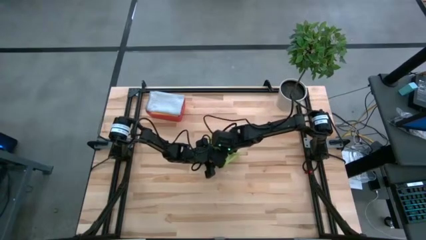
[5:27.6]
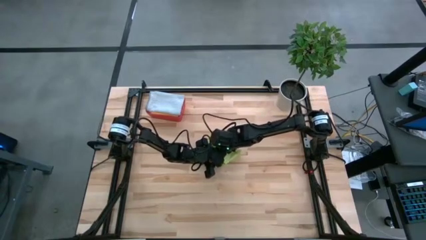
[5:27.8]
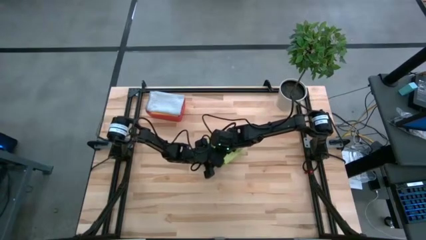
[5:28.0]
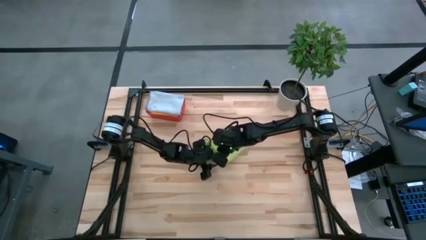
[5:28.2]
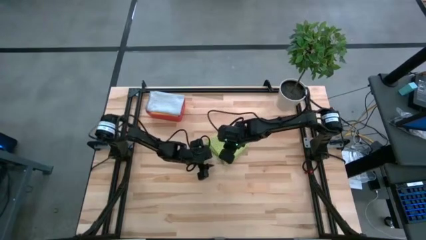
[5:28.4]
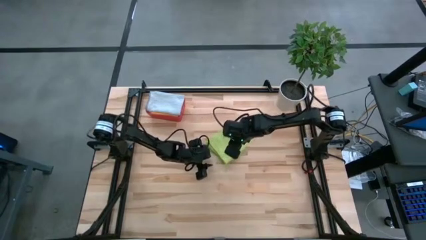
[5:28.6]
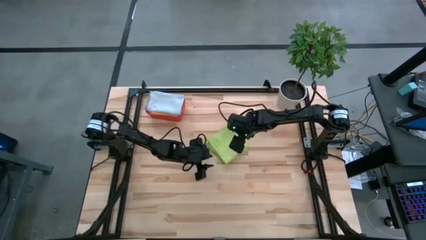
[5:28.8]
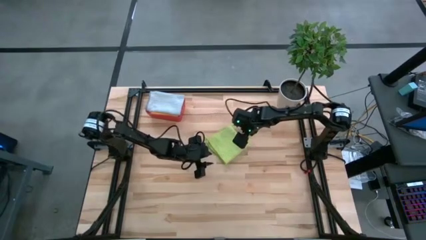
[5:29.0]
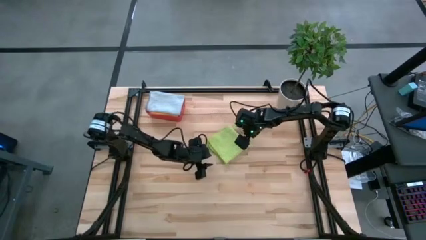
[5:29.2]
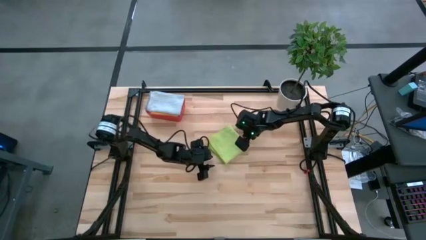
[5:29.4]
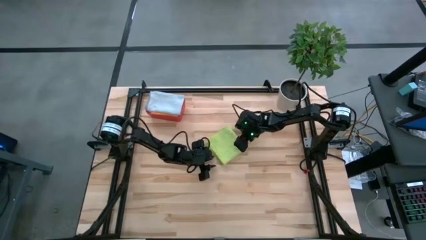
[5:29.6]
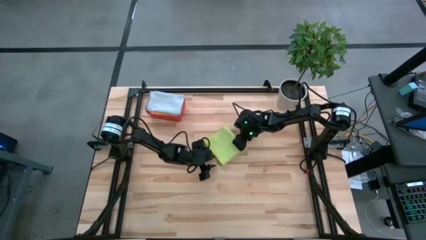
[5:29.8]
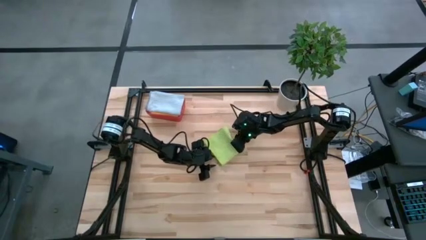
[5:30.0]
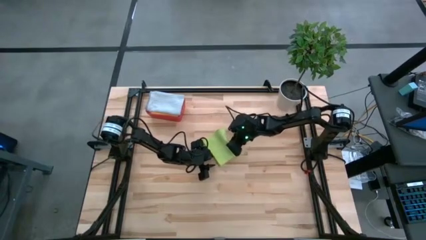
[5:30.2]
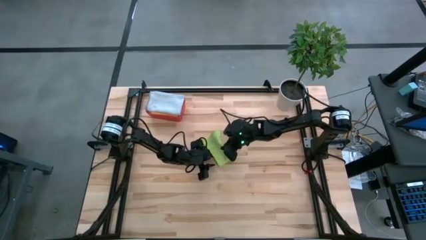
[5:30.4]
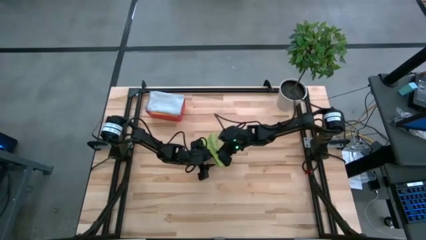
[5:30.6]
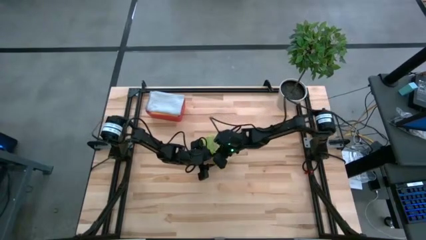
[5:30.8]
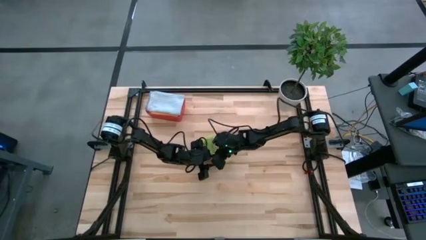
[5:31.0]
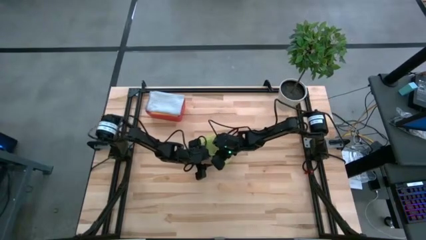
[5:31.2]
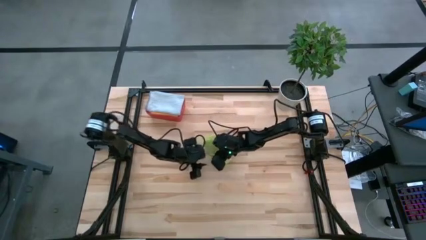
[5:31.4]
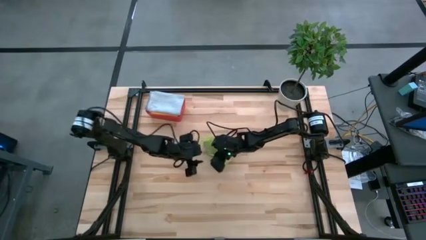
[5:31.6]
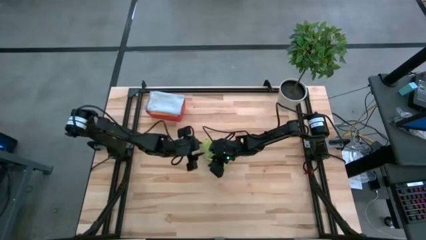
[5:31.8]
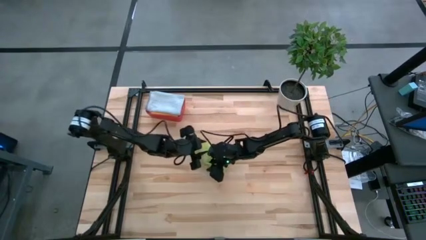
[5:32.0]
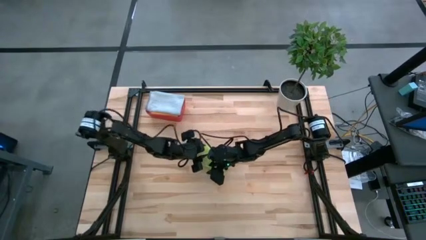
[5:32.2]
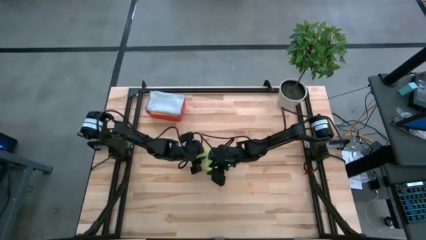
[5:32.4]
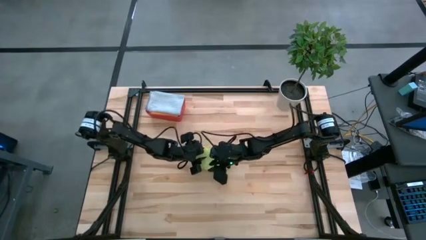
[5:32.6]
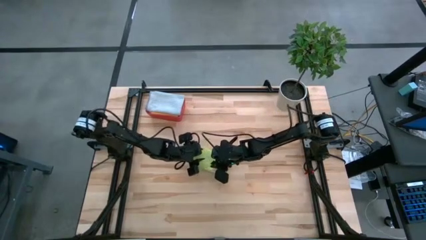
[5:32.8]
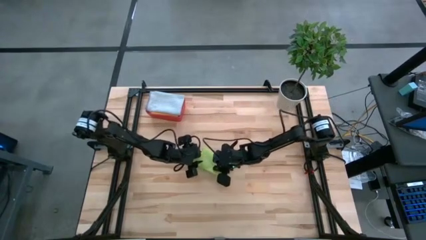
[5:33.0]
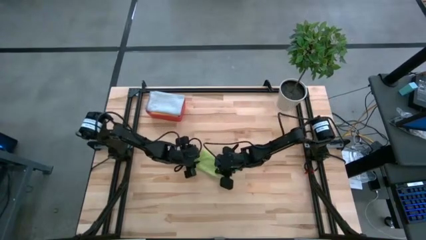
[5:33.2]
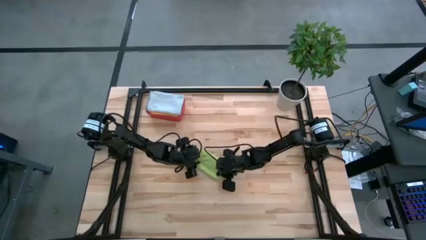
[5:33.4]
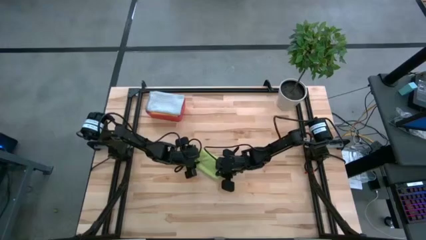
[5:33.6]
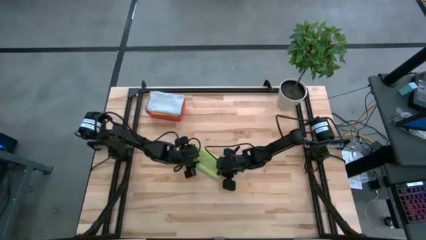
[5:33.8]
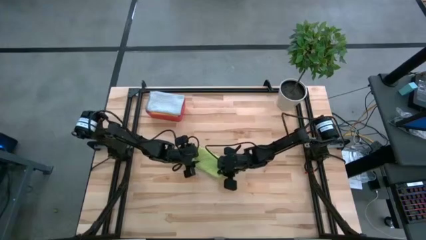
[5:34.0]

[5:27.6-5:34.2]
Task: Fold microfiber towels
Fold the light green microfiber cloth

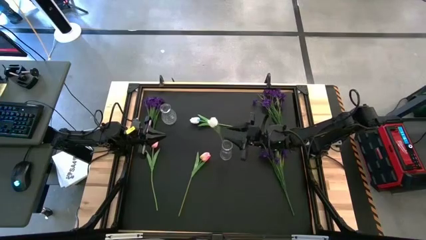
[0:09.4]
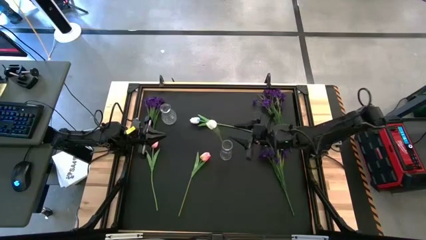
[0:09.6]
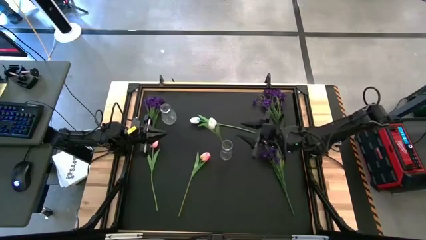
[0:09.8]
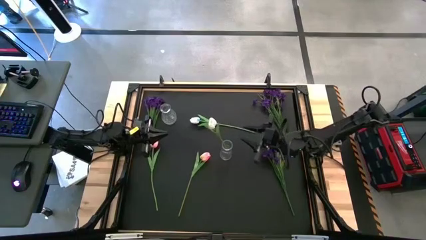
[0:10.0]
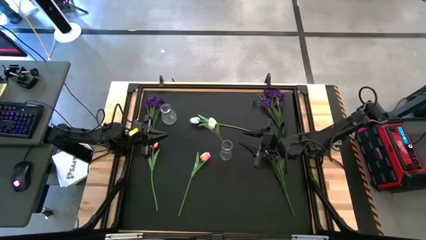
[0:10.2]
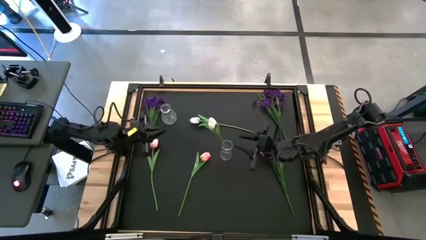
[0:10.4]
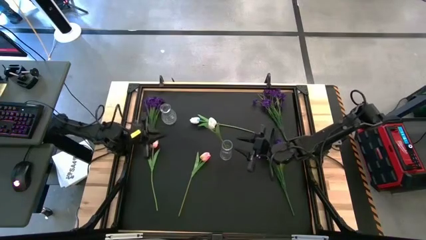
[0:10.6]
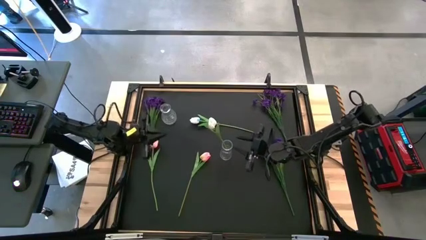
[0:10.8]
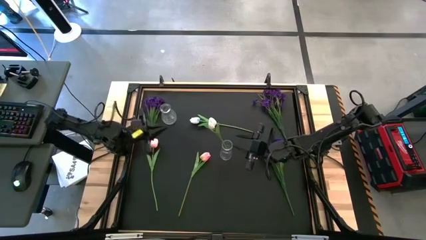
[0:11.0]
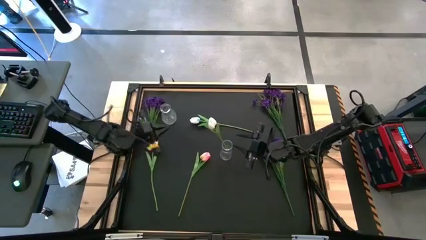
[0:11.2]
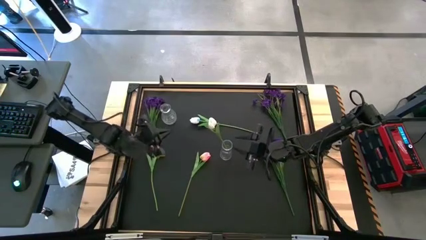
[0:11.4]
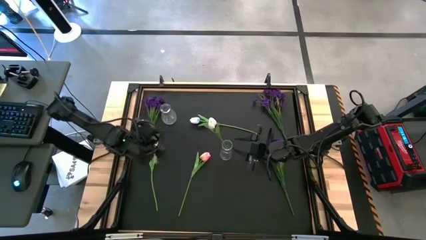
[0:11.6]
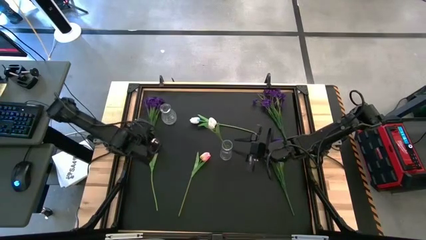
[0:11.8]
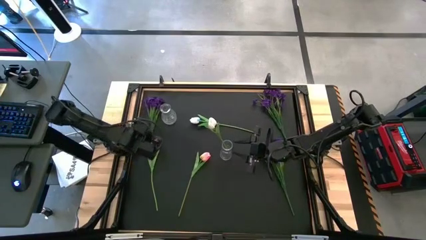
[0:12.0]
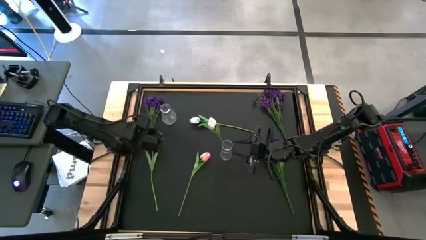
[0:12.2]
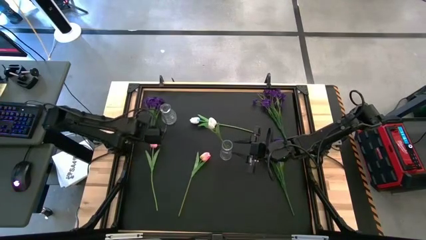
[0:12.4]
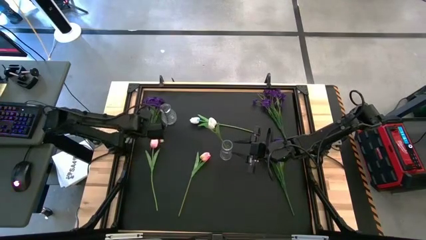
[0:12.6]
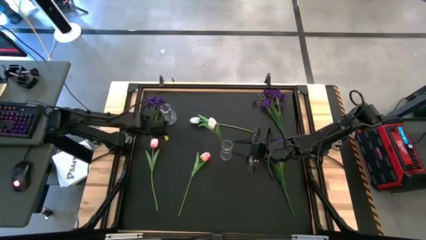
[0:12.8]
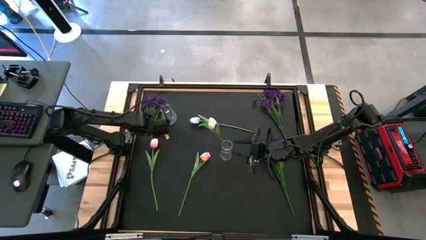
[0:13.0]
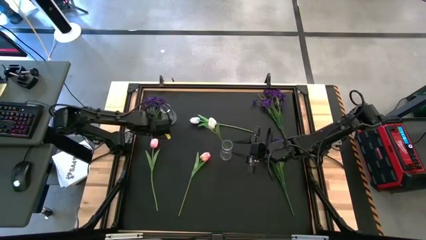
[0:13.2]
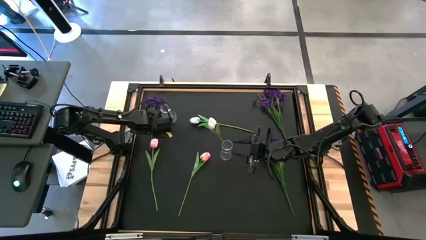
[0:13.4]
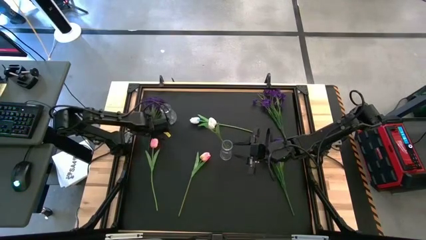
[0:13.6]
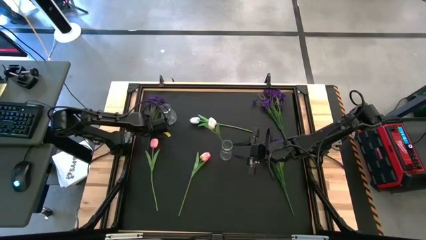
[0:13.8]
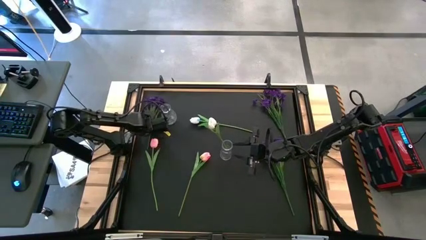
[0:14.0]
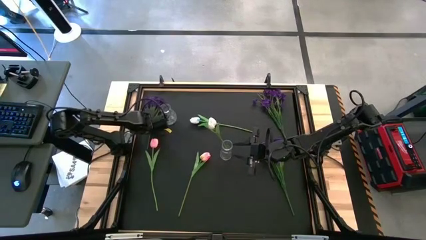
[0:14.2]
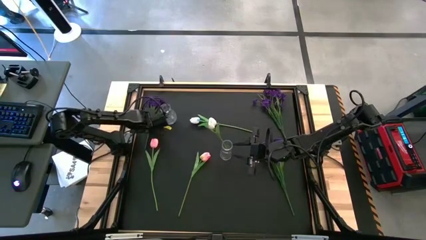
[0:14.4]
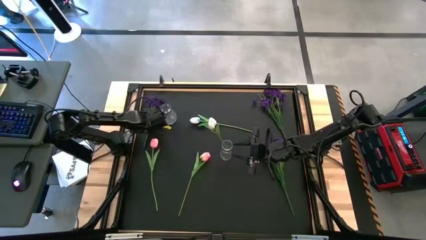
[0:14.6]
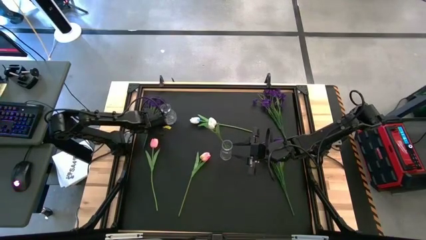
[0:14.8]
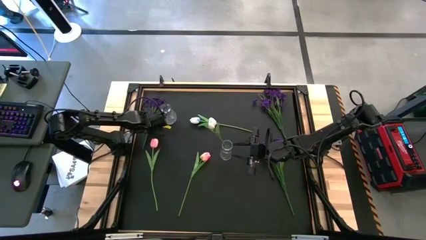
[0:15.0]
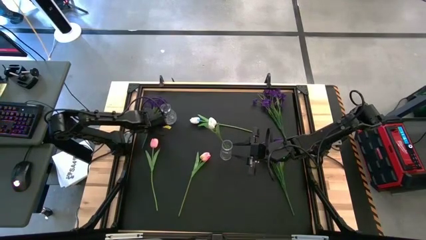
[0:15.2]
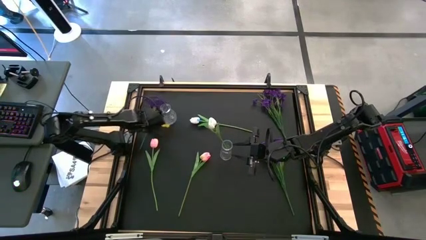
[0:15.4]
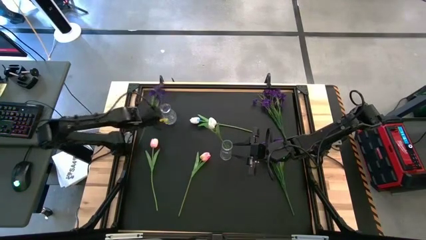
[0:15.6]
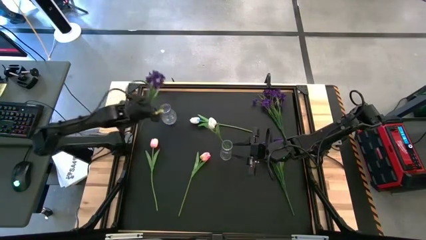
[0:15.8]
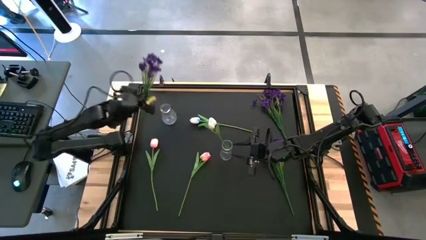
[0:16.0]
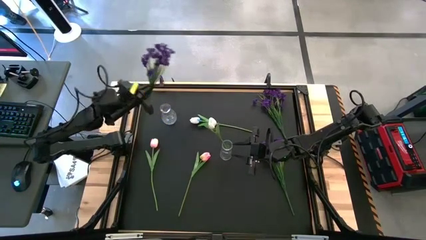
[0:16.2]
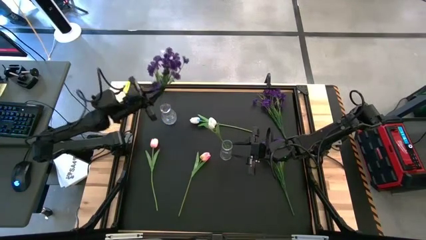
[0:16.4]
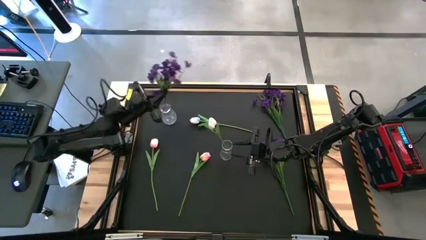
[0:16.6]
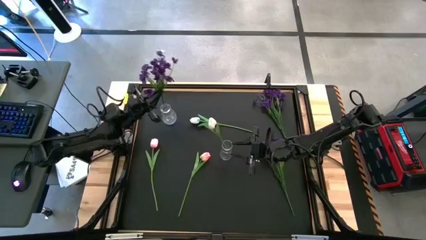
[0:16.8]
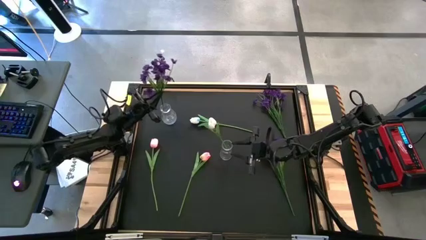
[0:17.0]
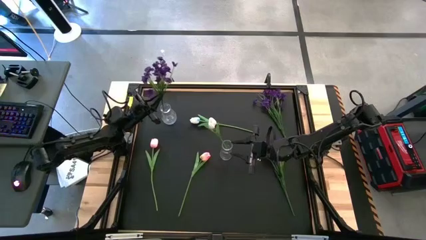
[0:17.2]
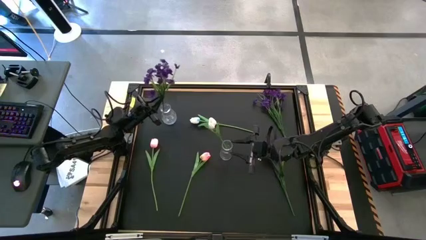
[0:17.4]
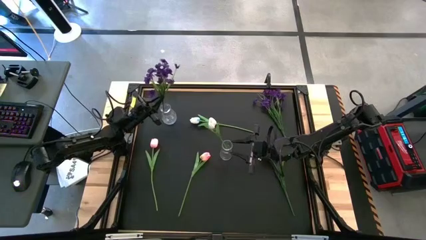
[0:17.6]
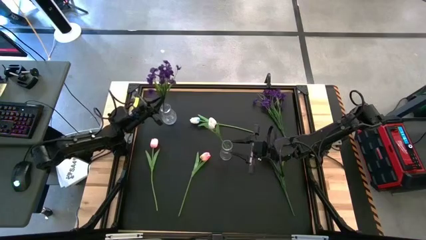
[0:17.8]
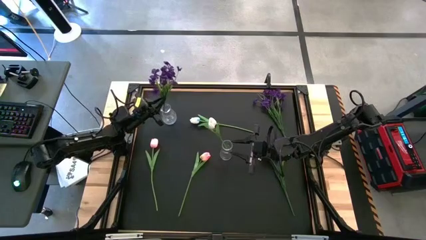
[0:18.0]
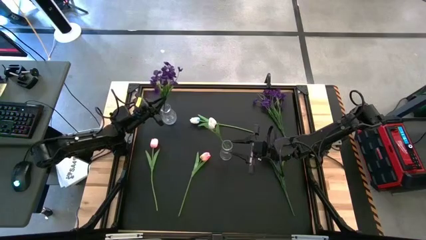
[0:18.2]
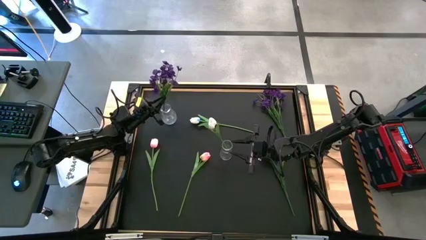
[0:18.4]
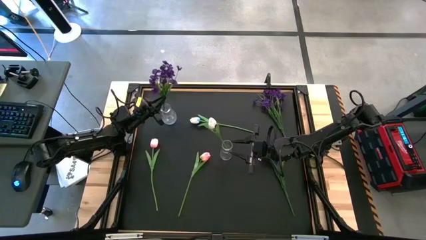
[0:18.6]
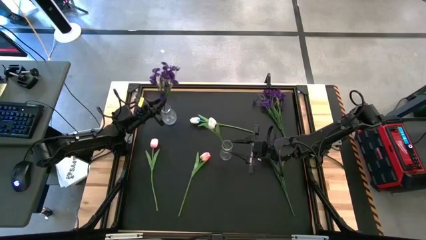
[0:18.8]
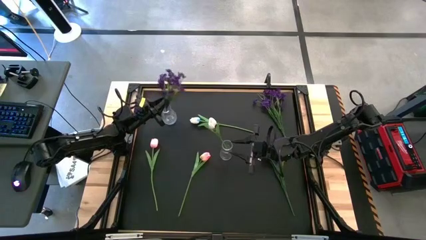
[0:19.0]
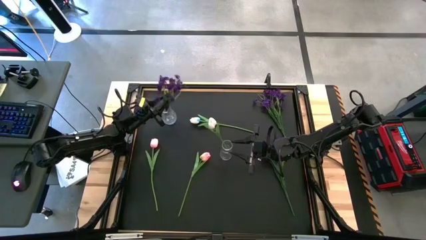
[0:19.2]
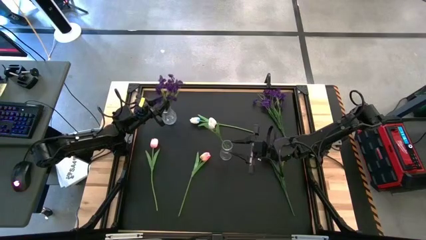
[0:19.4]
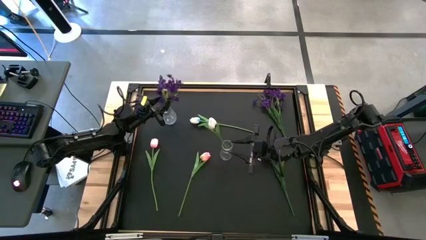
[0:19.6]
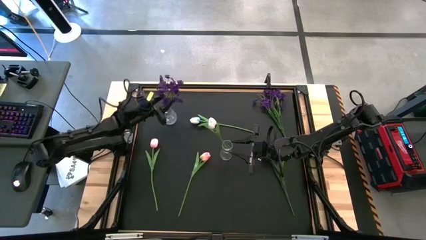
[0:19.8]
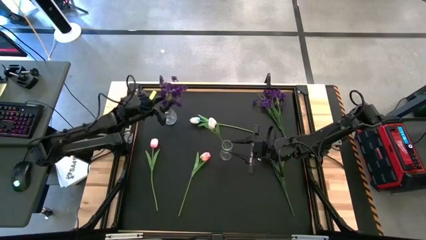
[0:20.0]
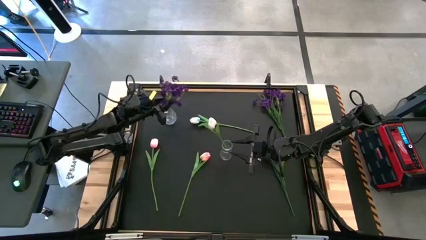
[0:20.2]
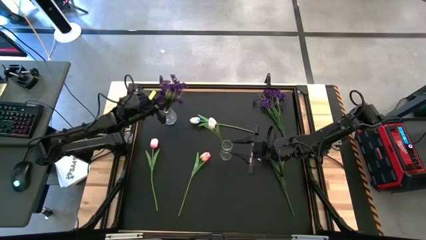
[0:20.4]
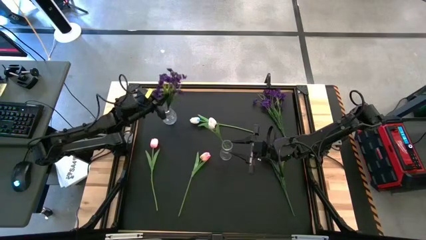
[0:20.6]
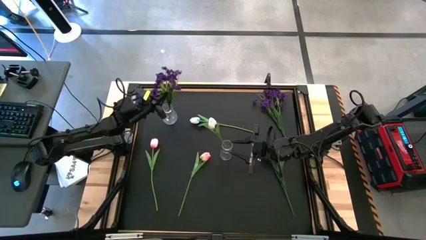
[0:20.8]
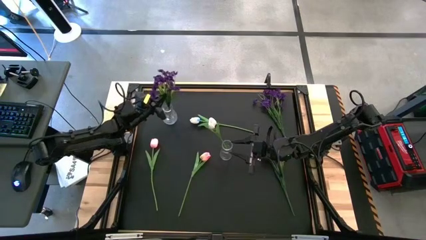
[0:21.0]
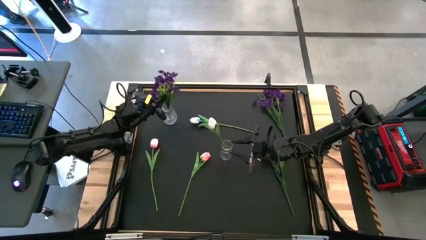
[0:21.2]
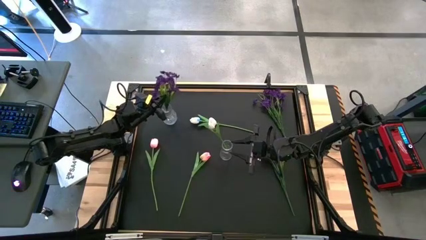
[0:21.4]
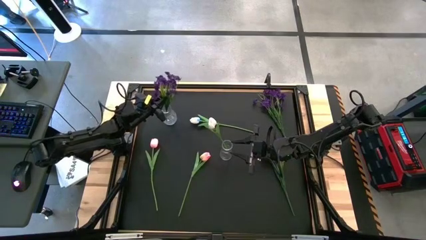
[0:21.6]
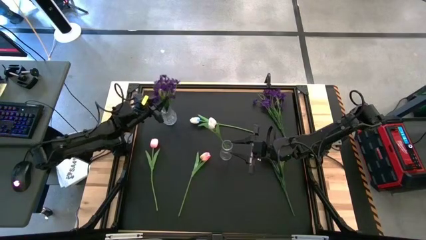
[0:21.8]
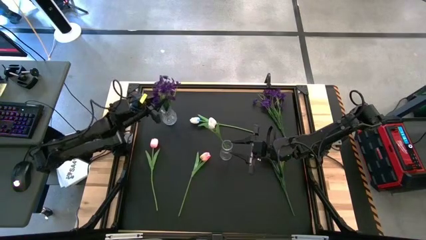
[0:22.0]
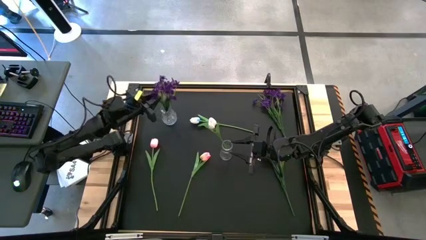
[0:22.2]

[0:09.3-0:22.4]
Task: Sort flowers into vase by color
Put the left violet flower into the left transparent flower vase
